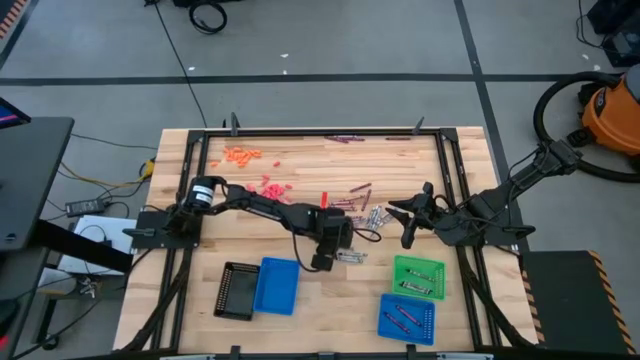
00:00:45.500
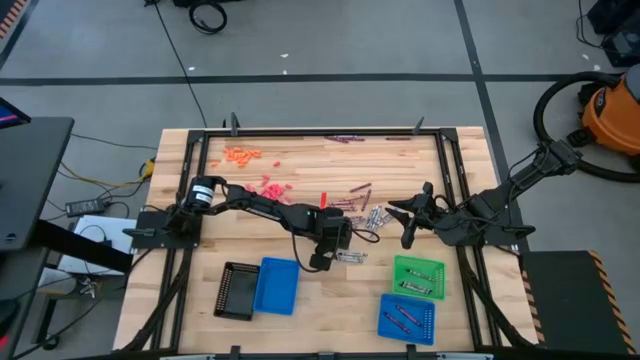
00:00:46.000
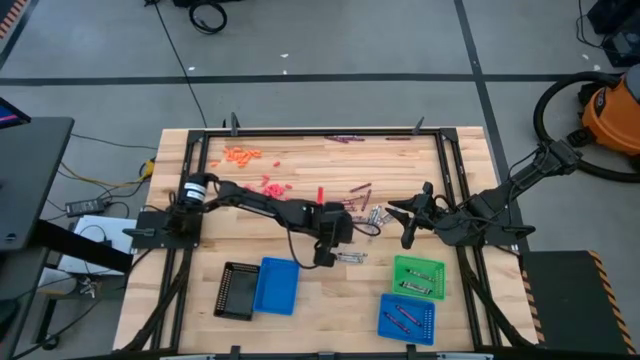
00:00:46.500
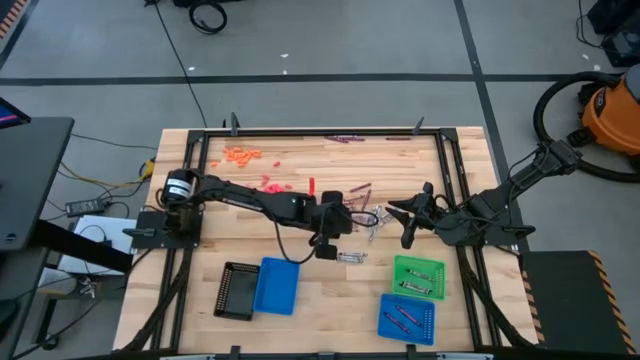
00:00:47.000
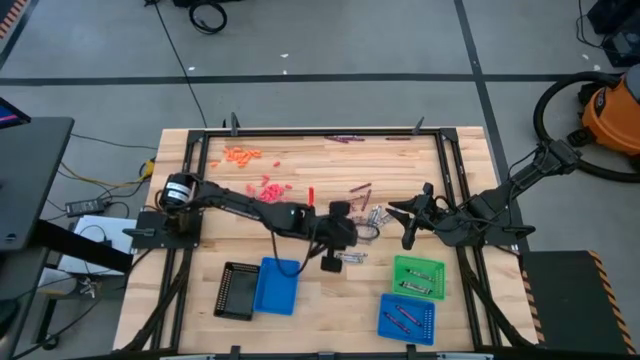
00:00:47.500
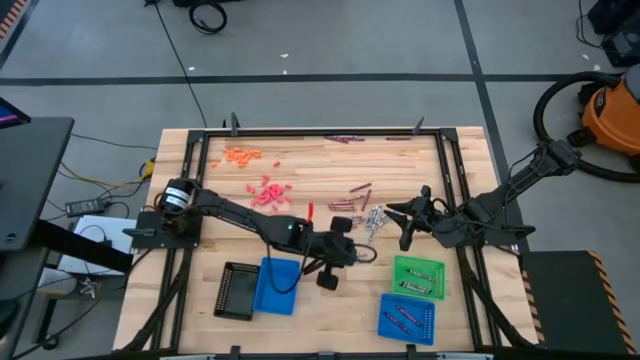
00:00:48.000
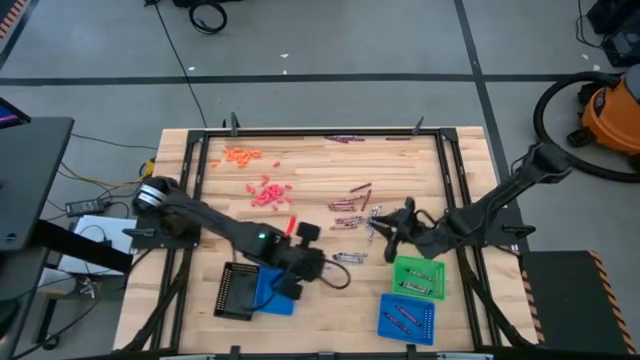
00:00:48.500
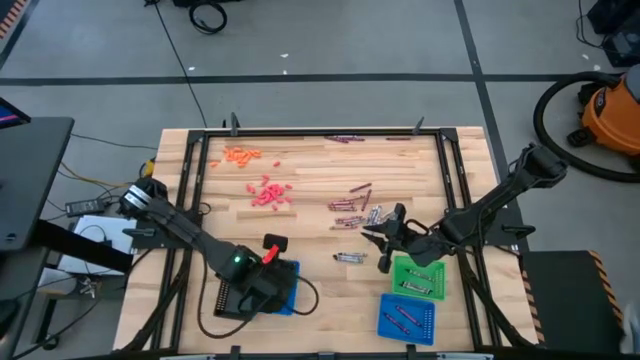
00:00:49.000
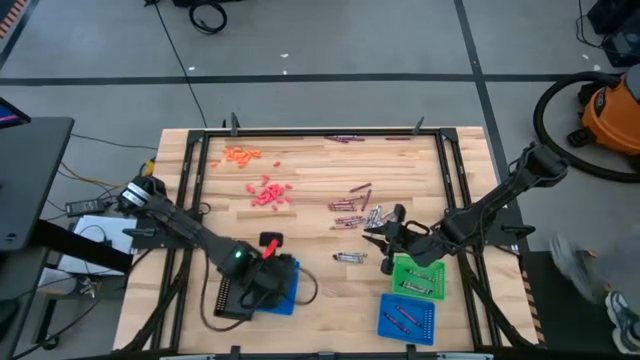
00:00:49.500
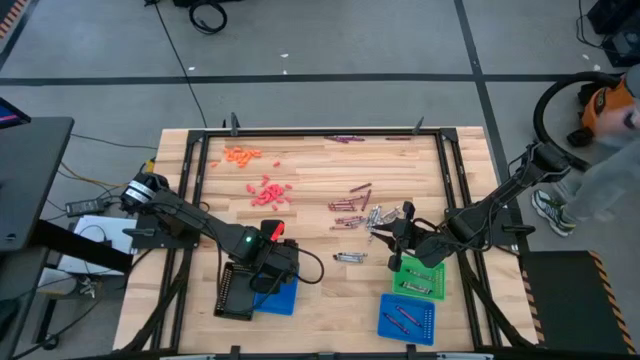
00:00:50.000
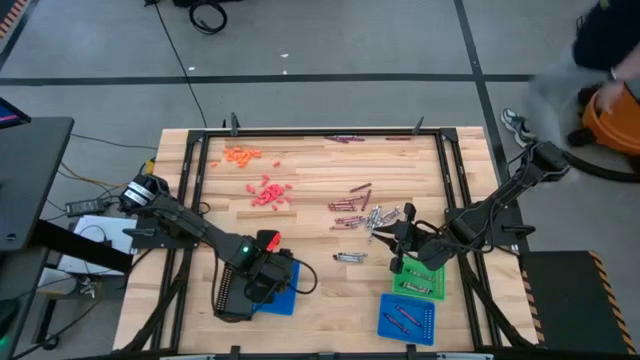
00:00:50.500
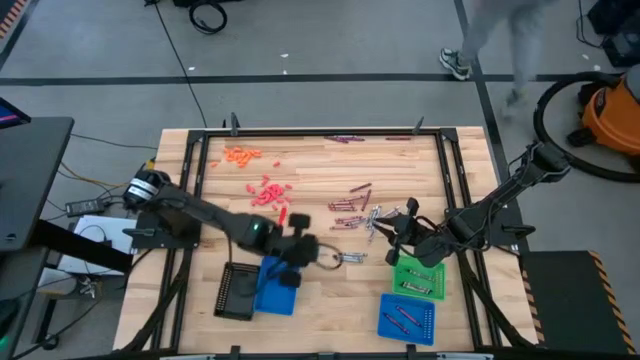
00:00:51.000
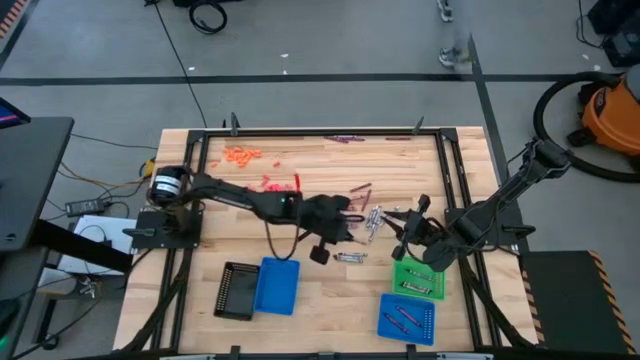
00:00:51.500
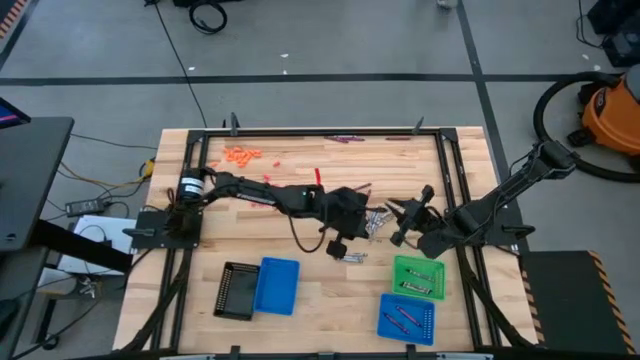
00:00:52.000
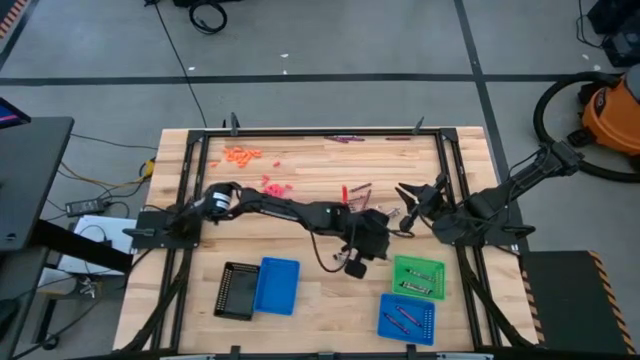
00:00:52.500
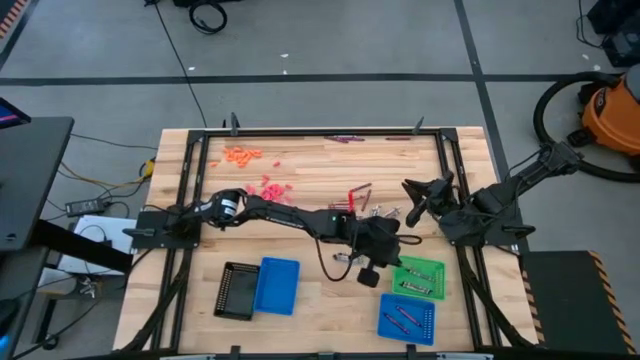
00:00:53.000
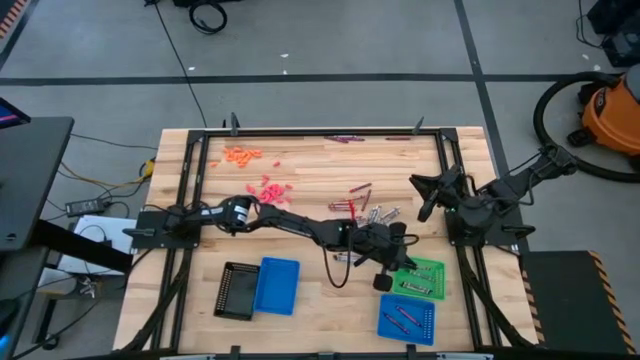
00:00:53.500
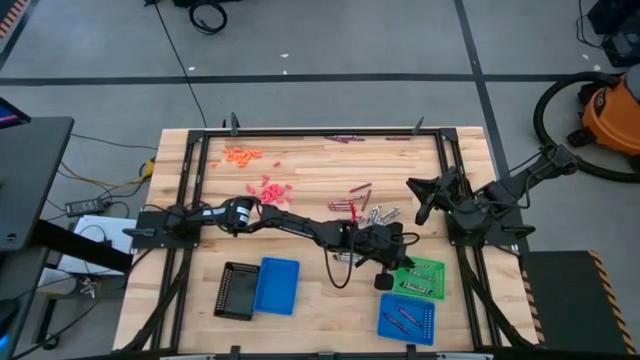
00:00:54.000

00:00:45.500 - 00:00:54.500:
Task: Sort crayons
Put the black crayon into the green bin

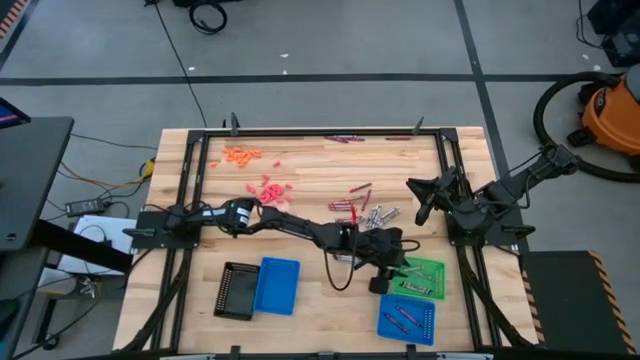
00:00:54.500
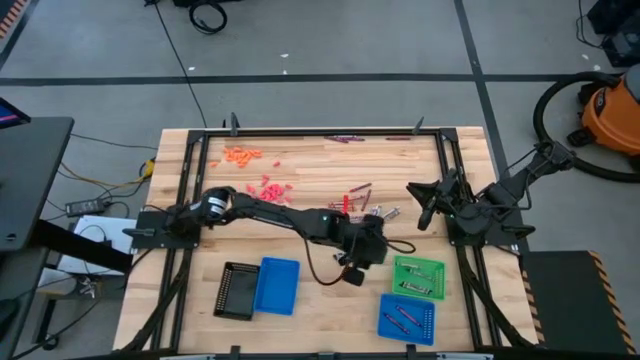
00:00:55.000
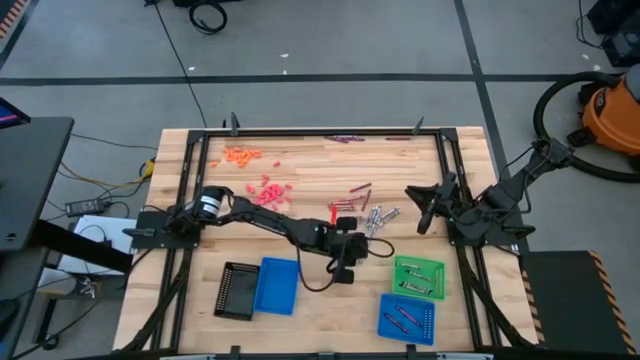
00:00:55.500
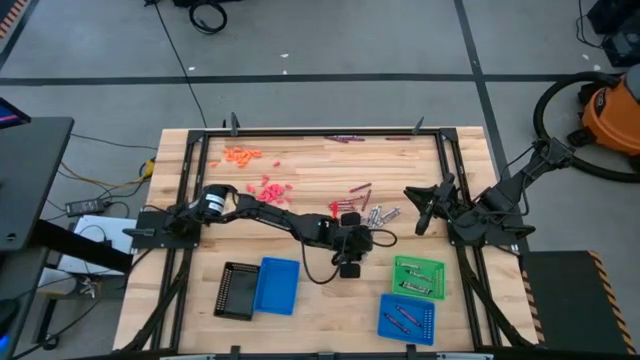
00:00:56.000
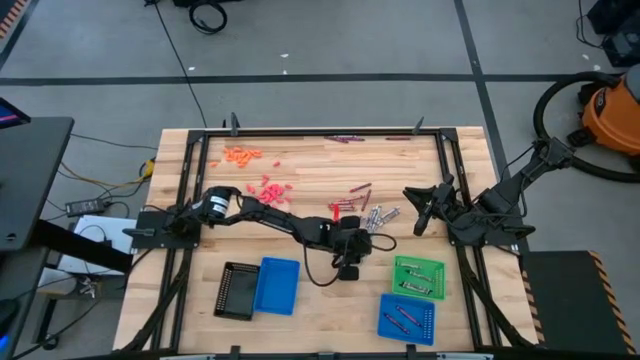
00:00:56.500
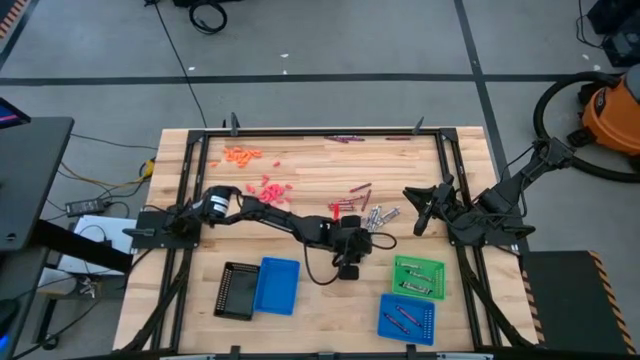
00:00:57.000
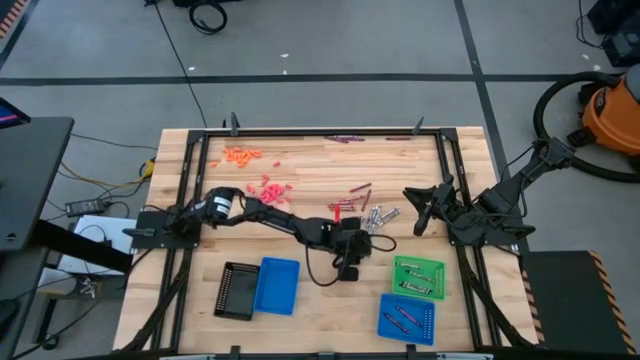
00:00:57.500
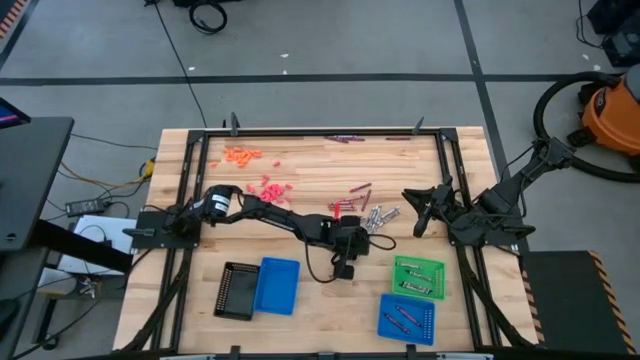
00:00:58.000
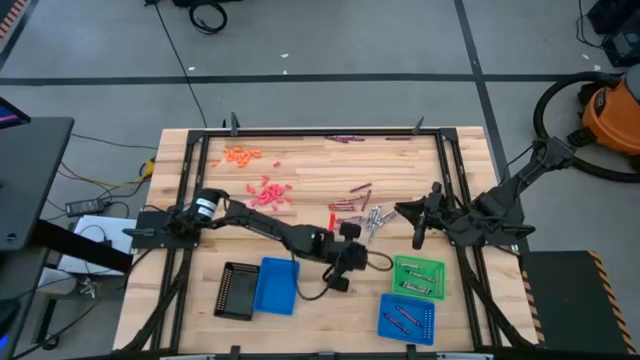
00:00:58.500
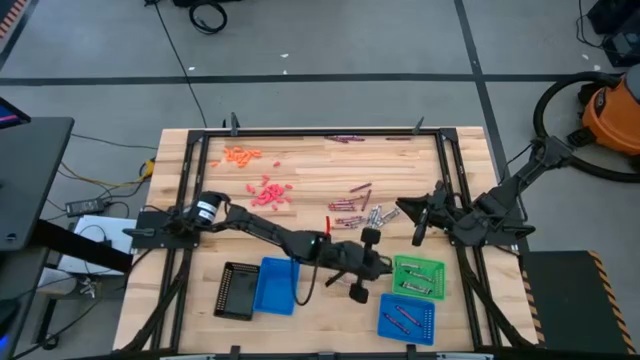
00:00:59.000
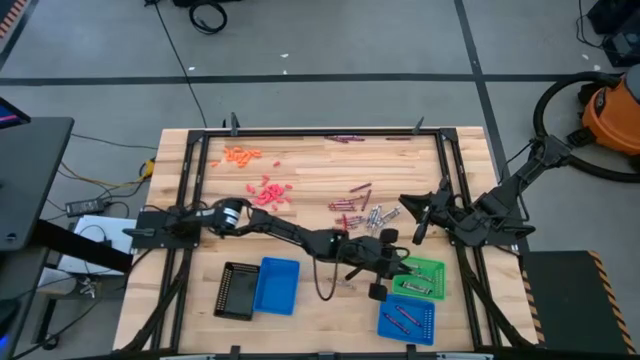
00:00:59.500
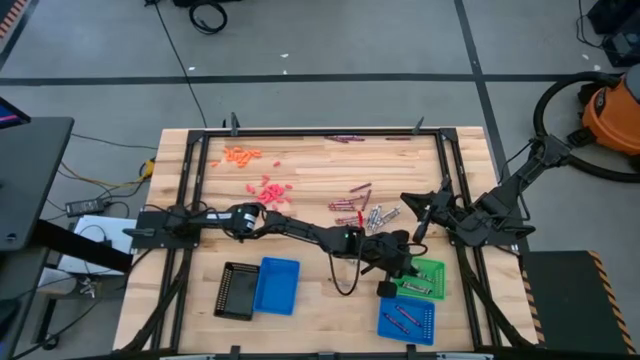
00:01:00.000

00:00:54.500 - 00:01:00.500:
Put the black crayon into the green bin

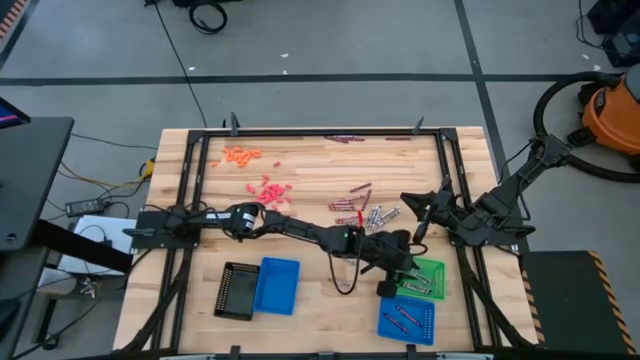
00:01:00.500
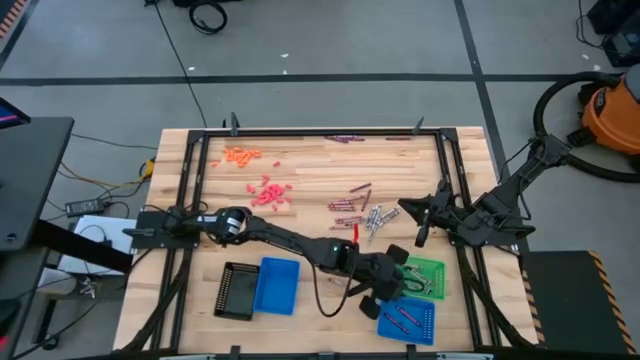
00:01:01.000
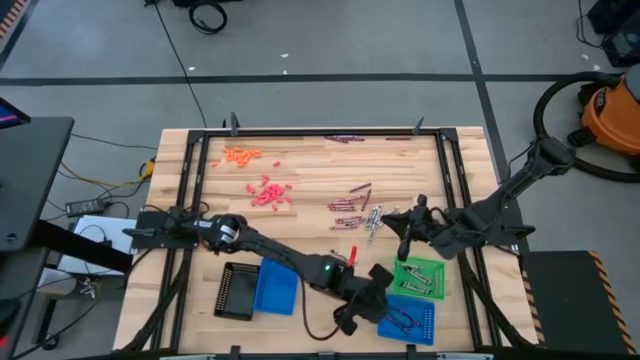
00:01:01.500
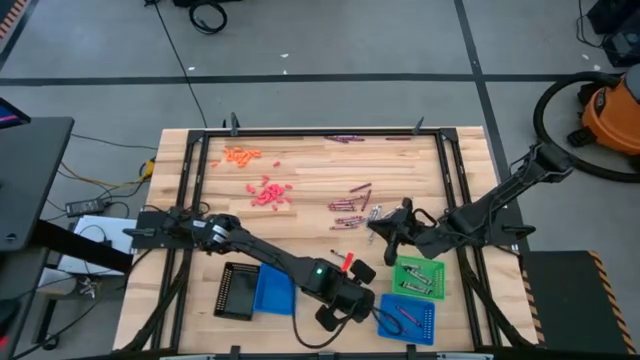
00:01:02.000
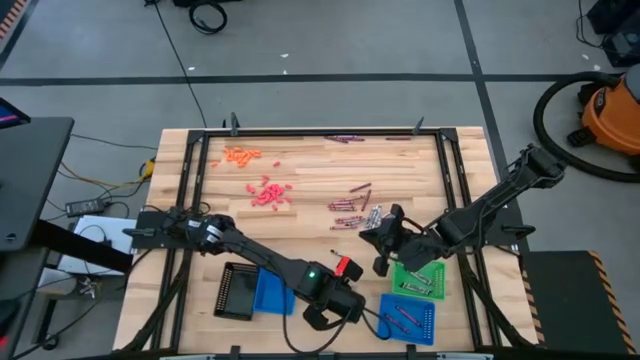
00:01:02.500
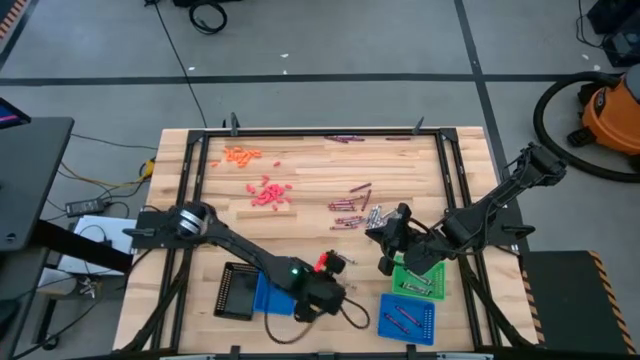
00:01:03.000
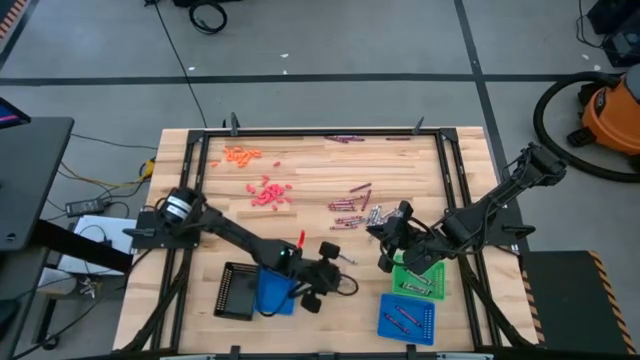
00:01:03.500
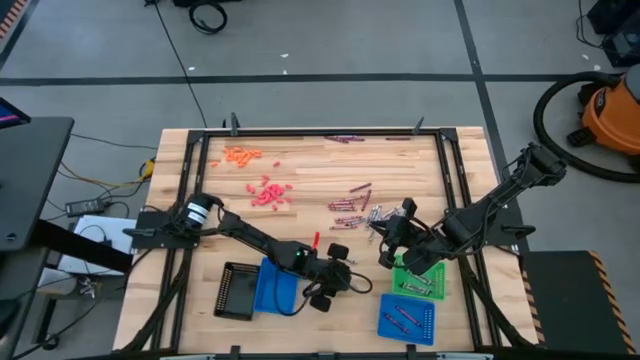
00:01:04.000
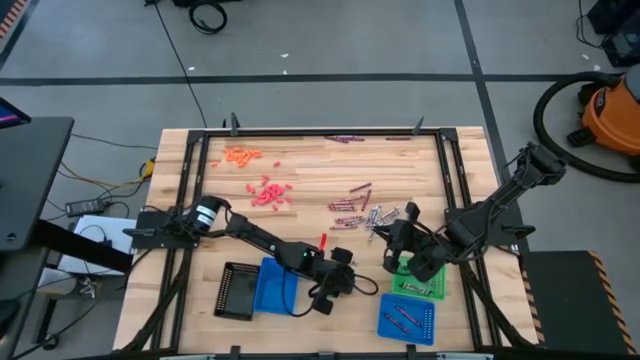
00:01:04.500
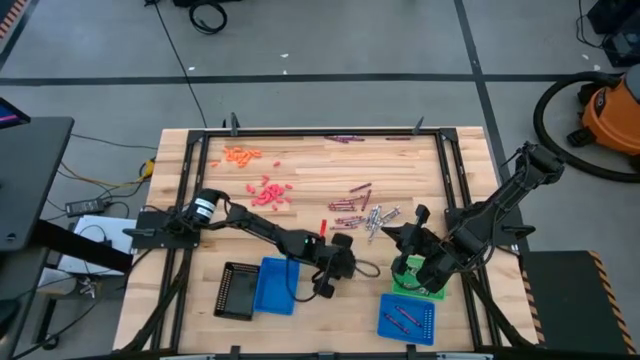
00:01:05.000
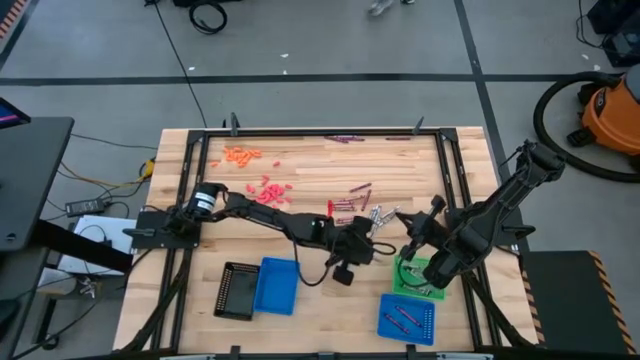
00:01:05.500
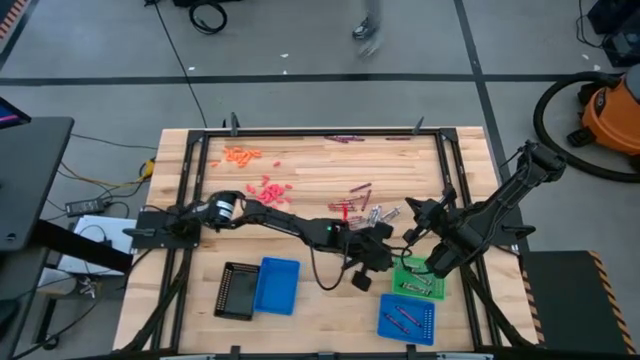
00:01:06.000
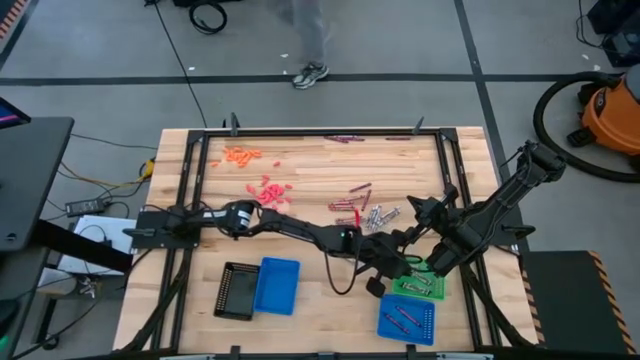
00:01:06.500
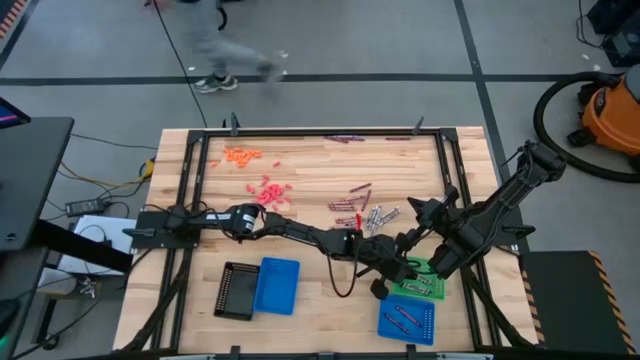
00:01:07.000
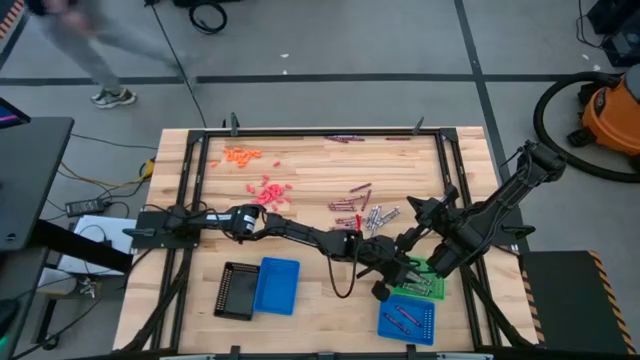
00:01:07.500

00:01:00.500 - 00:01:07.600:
Put the black crayon into the green bin
